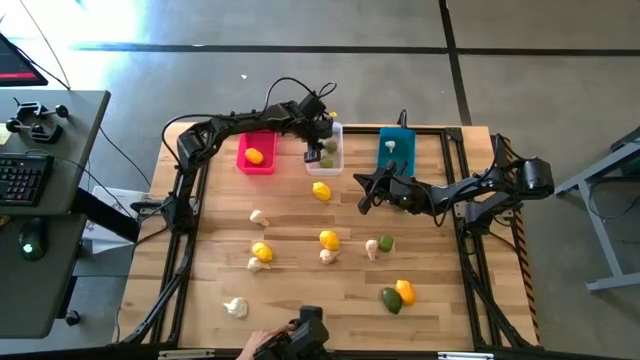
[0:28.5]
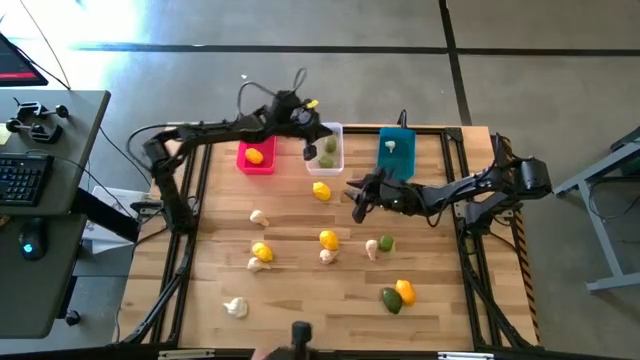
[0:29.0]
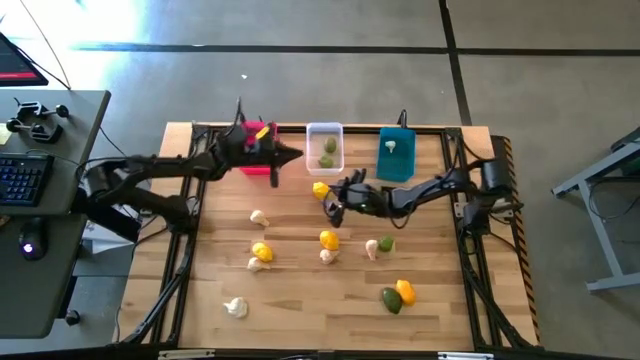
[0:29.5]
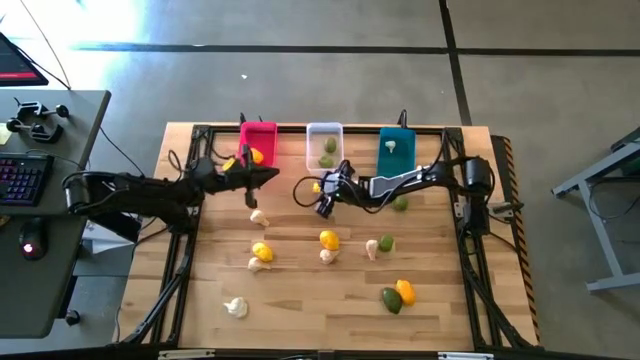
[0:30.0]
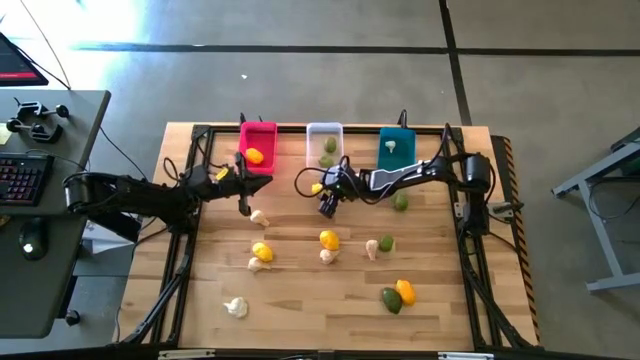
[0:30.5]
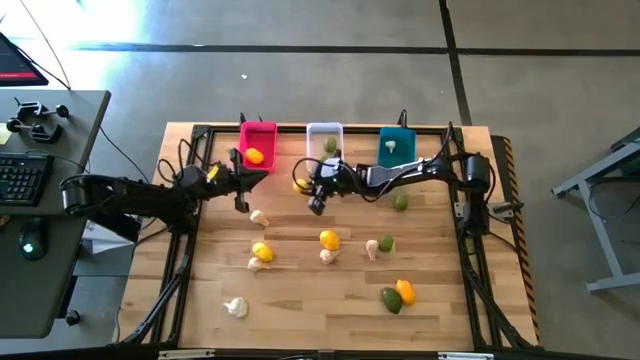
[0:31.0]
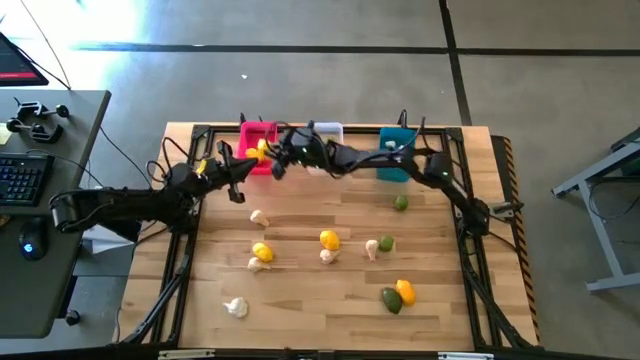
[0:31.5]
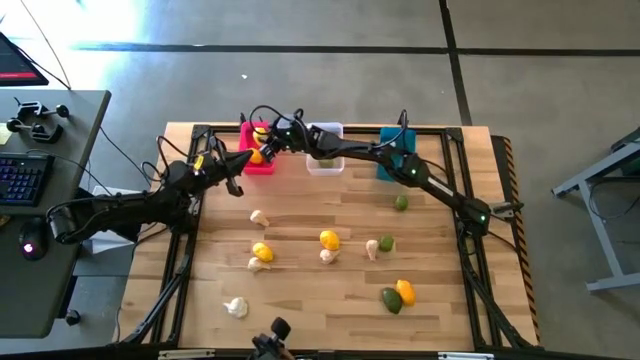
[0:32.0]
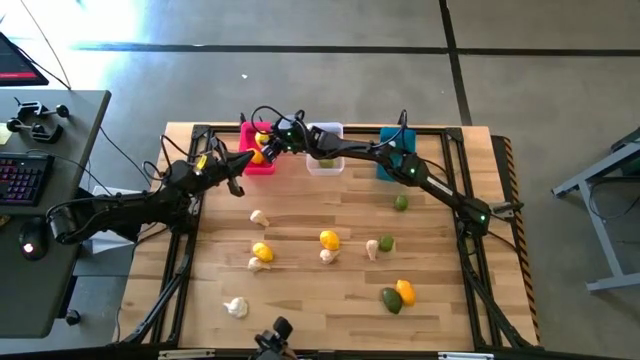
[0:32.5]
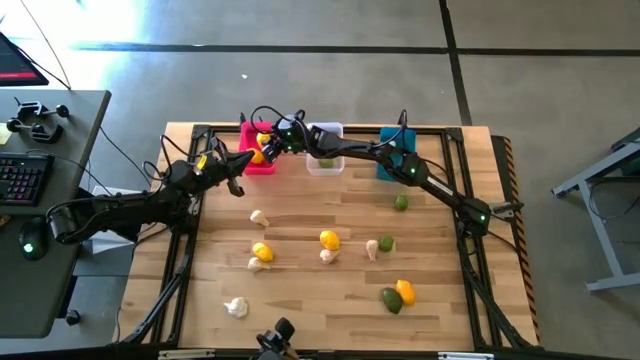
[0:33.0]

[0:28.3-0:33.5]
Task: Sort produce into baskets
Put the lemon into the pink bin

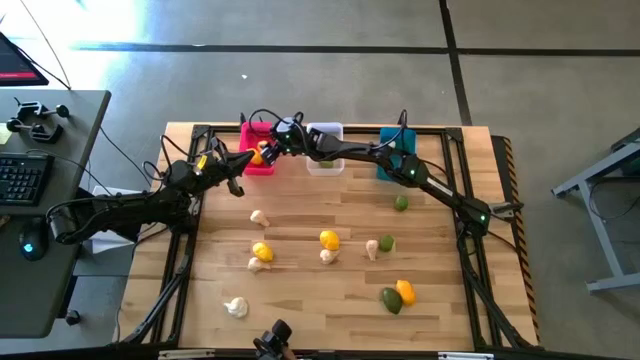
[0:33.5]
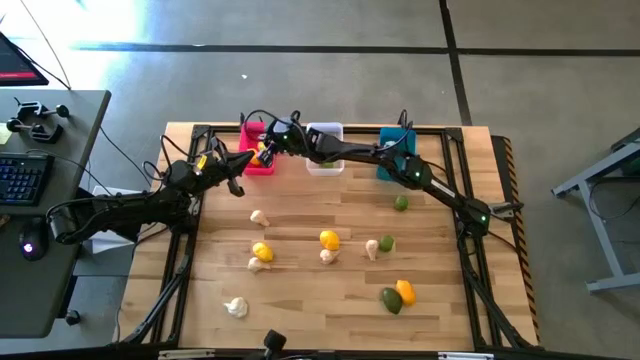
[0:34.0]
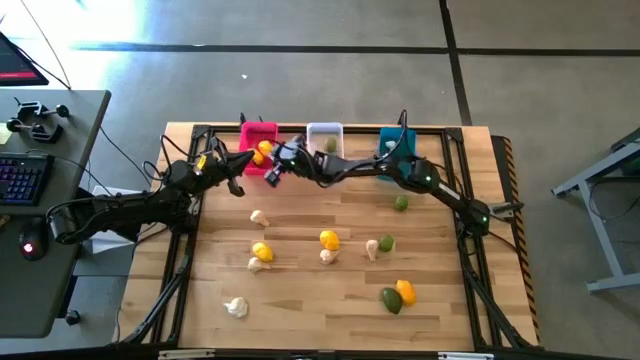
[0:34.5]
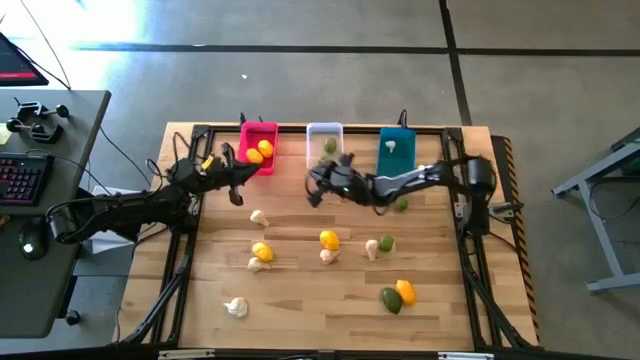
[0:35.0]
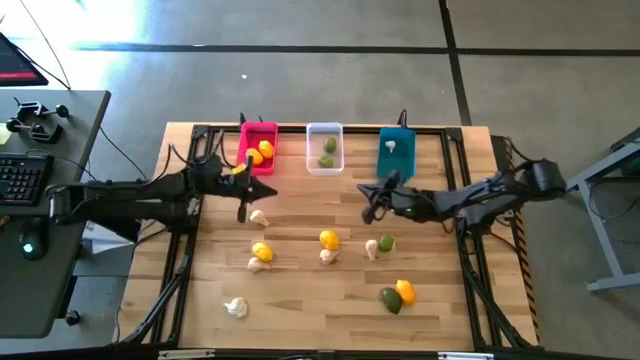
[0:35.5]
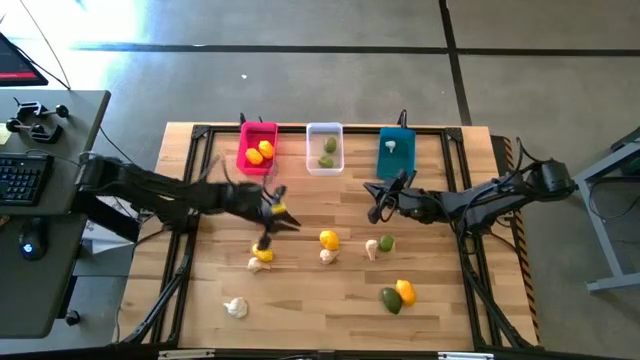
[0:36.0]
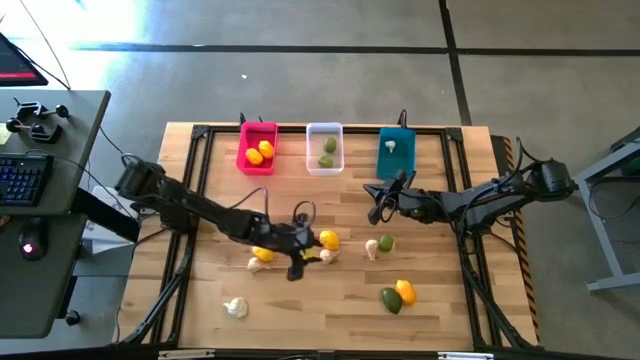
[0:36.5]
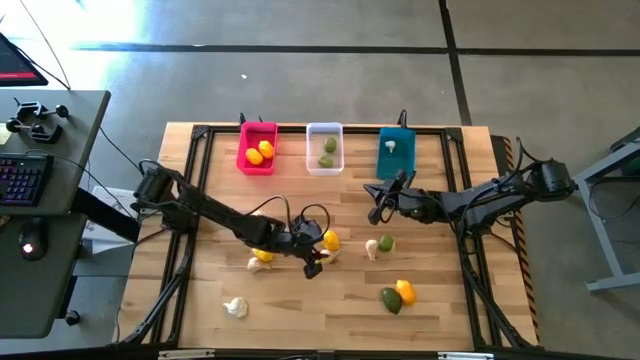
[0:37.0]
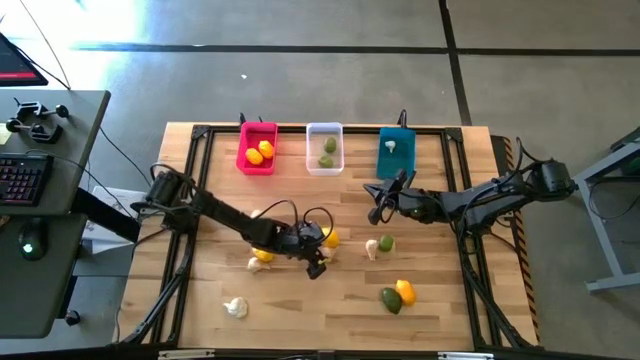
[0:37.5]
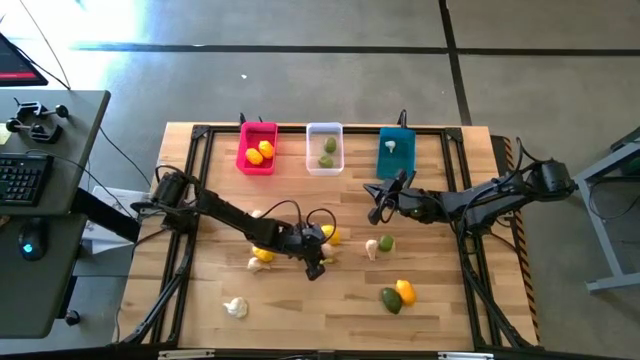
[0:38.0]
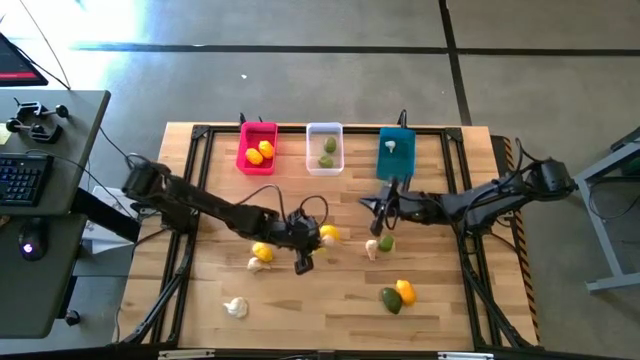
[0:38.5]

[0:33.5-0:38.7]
Put the white garlic into the blue bin

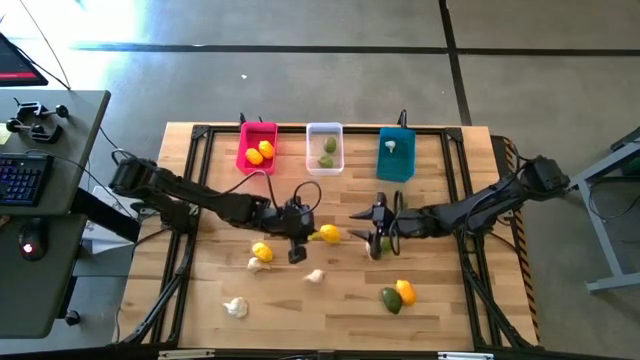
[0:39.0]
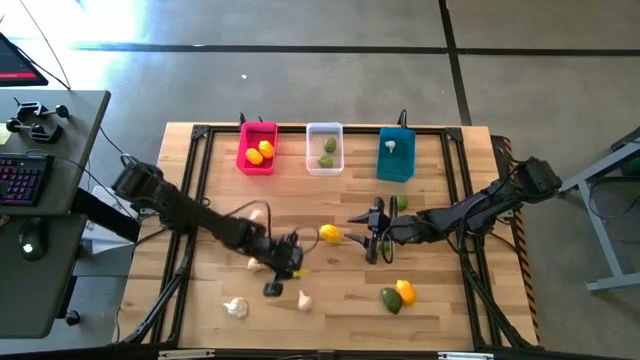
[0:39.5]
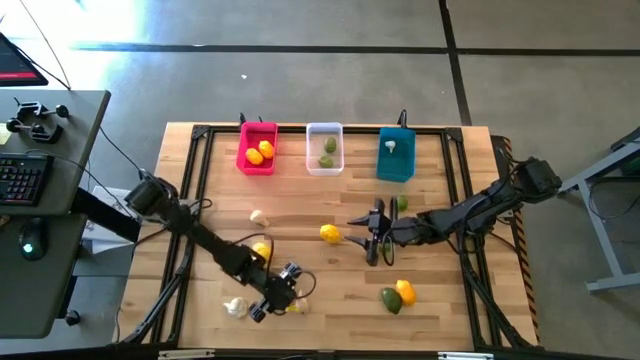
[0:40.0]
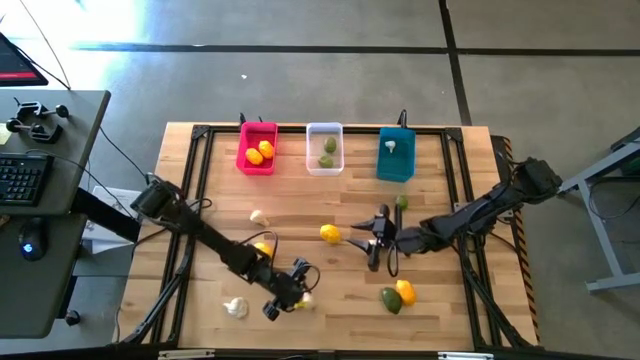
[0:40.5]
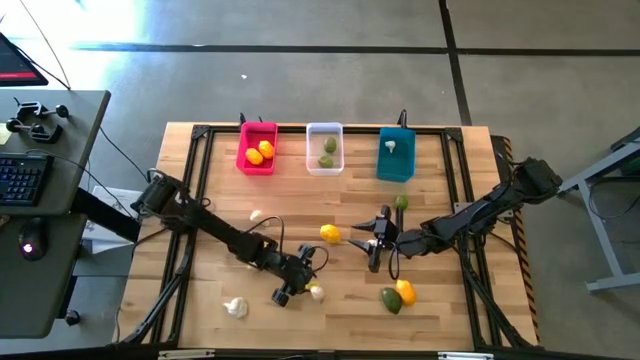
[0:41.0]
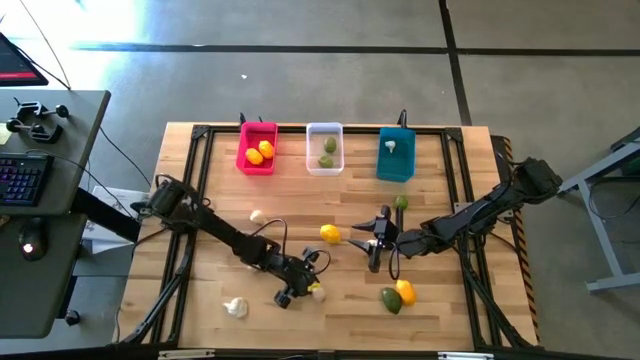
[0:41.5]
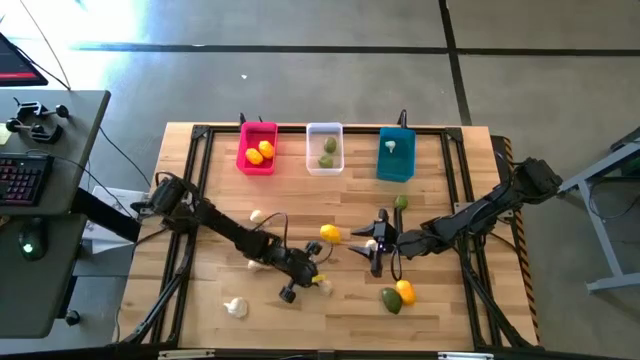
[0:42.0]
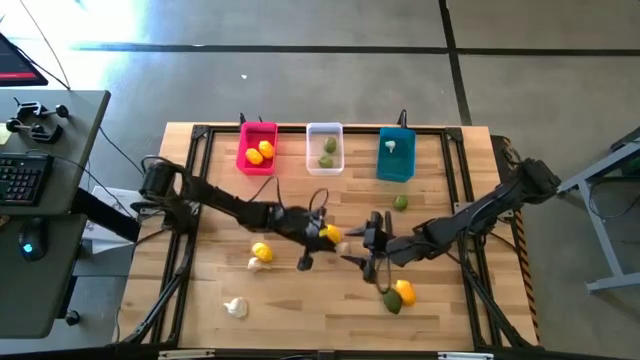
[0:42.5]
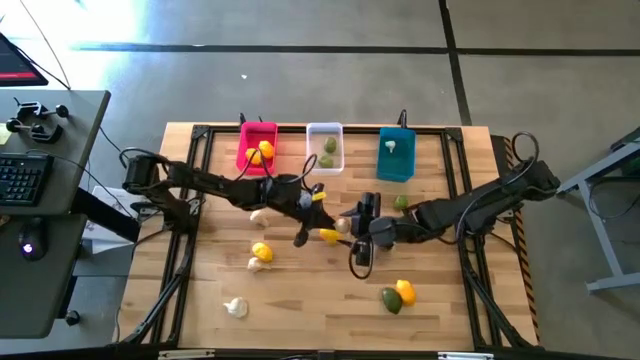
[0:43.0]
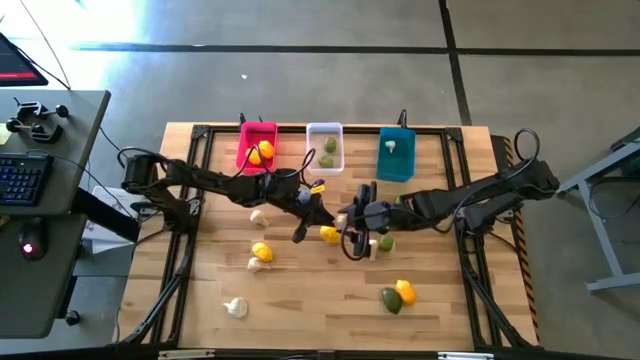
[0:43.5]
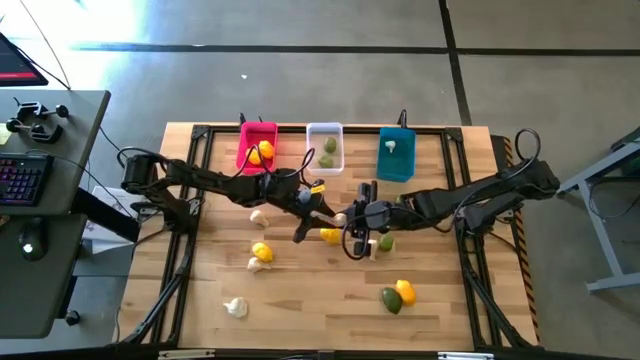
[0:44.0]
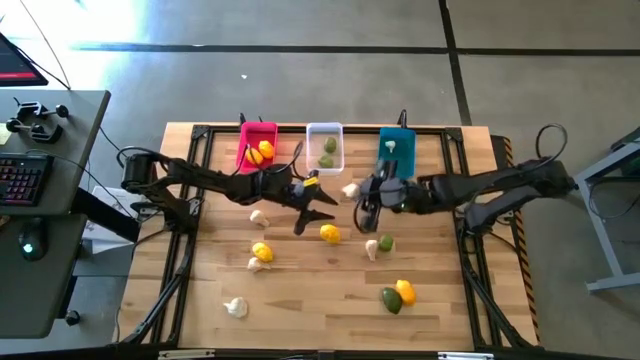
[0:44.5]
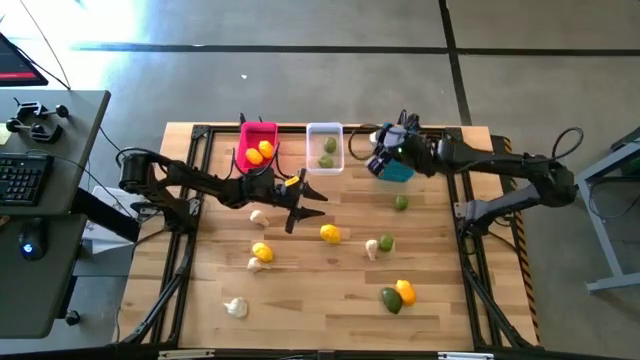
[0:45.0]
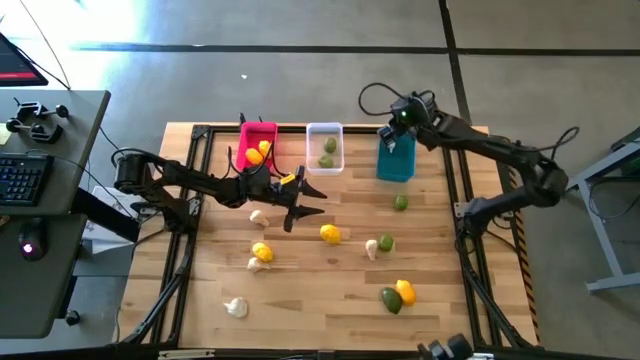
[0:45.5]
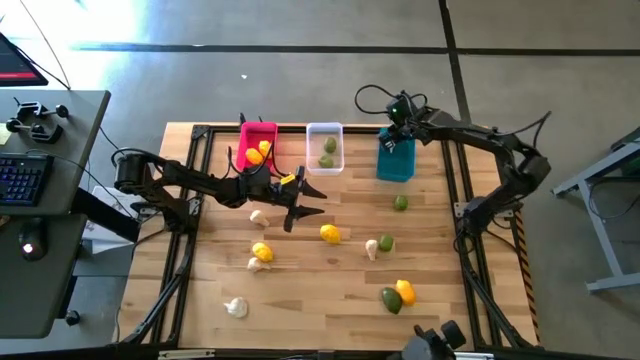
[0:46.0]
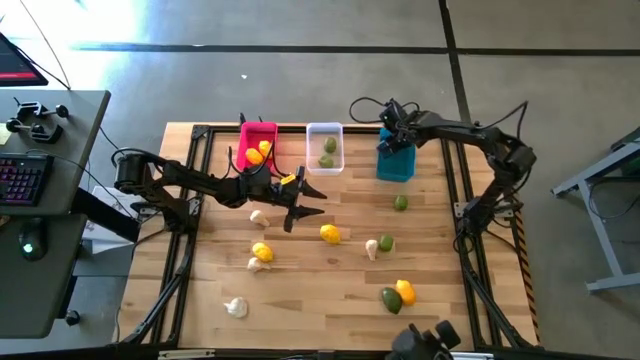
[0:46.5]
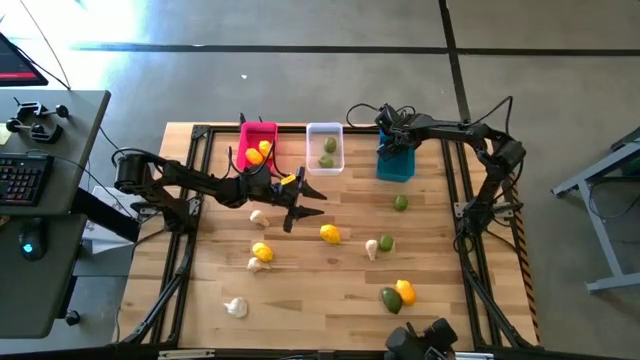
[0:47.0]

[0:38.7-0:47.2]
Put the white garlic into the blue bin

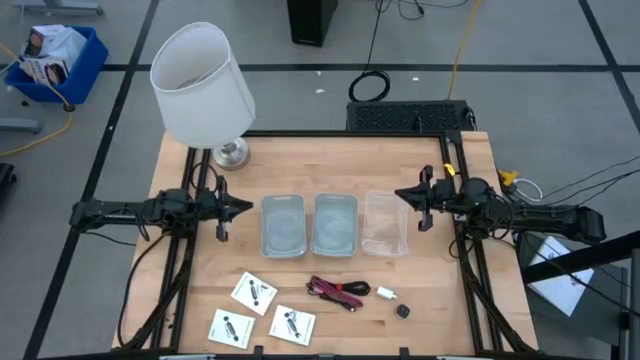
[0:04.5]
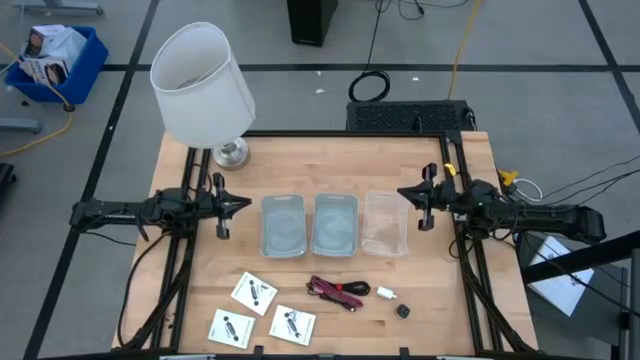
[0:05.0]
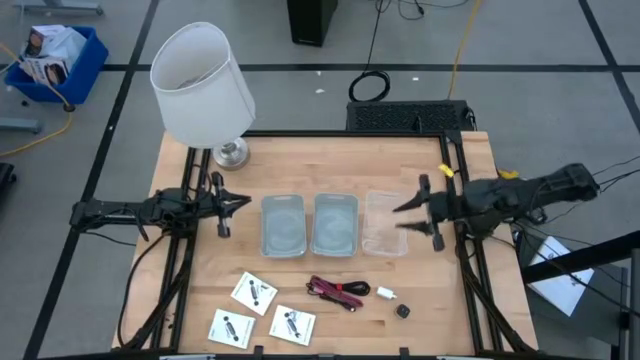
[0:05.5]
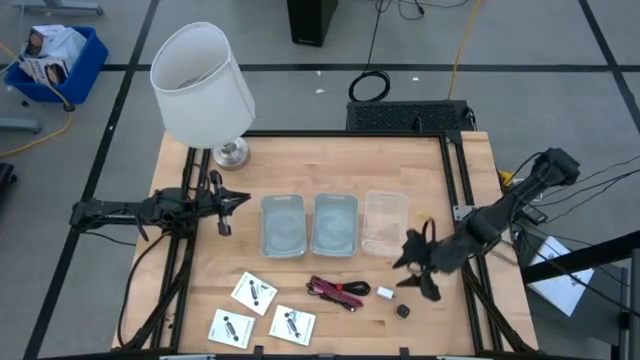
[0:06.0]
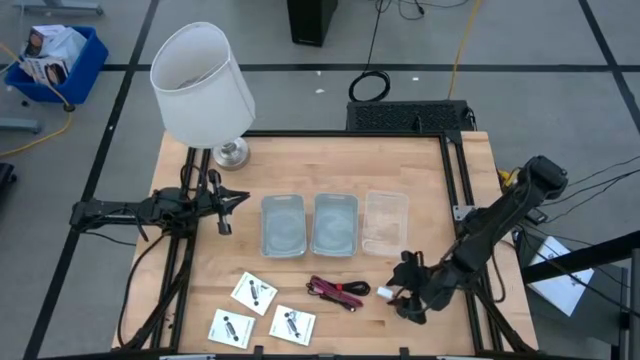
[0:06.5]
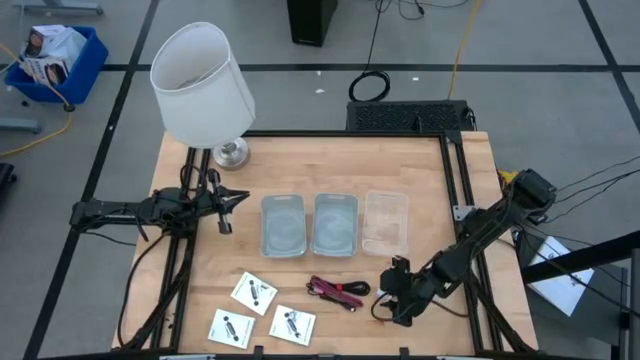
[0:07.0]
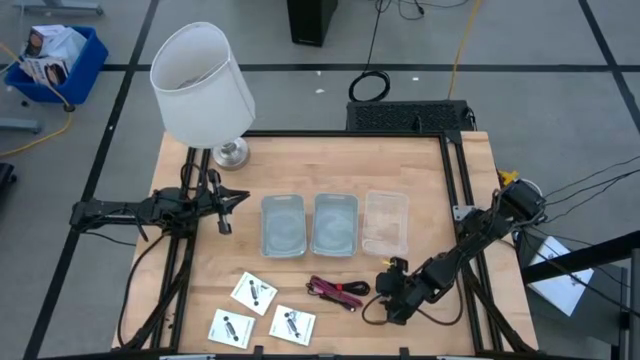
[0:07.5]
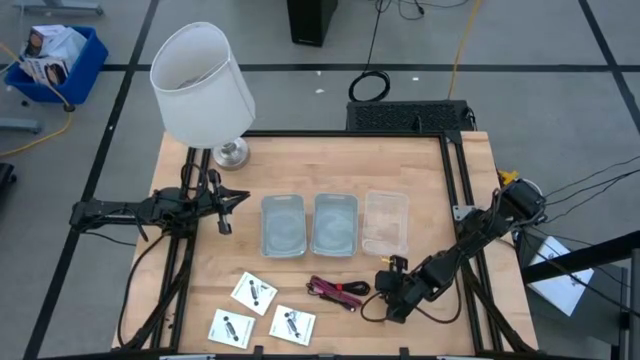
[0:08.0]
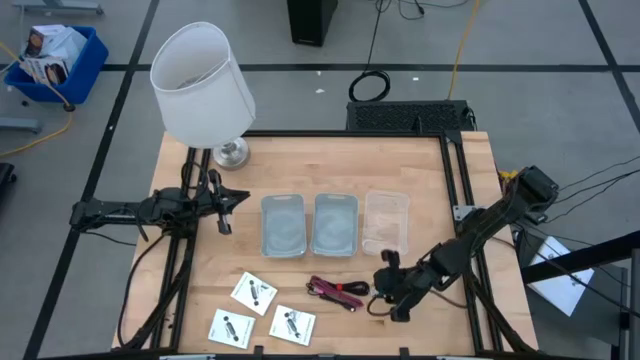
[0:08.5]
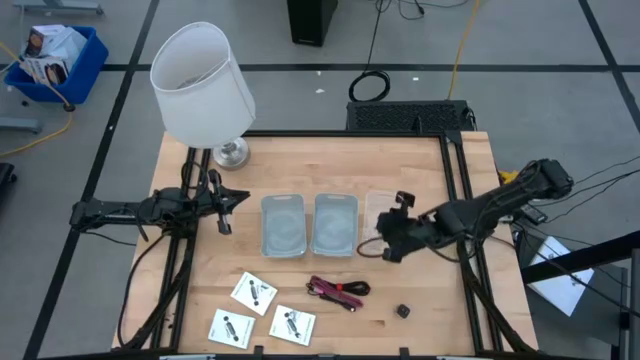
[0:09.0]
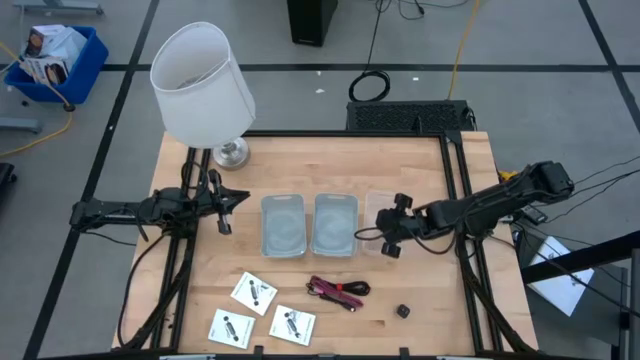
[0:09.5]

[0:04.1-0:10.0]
Task: Pick and place items into bin
Put the white charger adapter into the transparent bin
